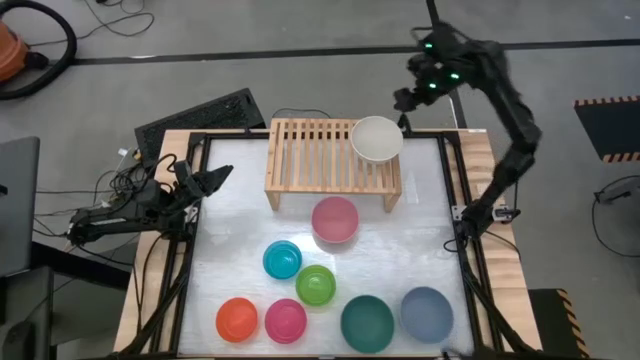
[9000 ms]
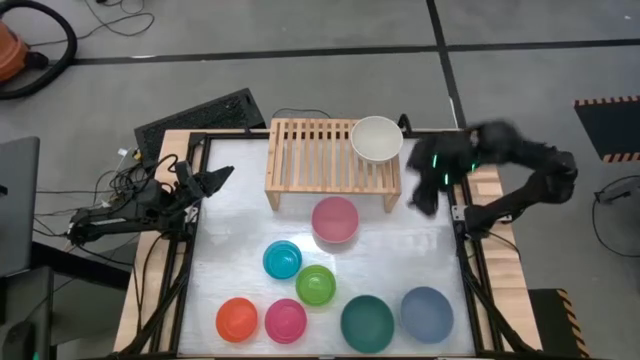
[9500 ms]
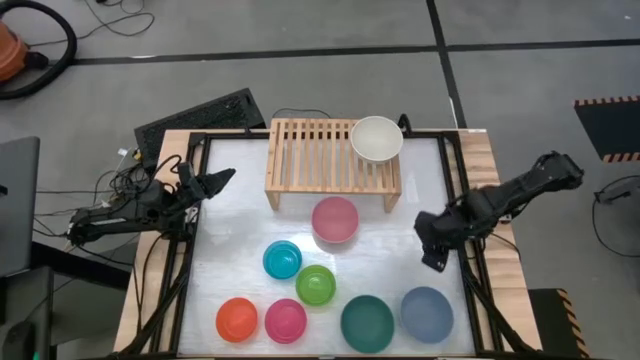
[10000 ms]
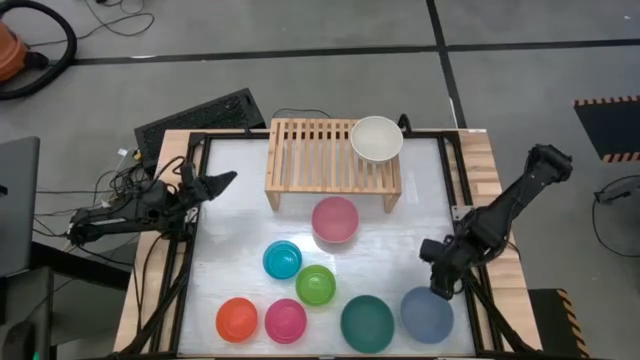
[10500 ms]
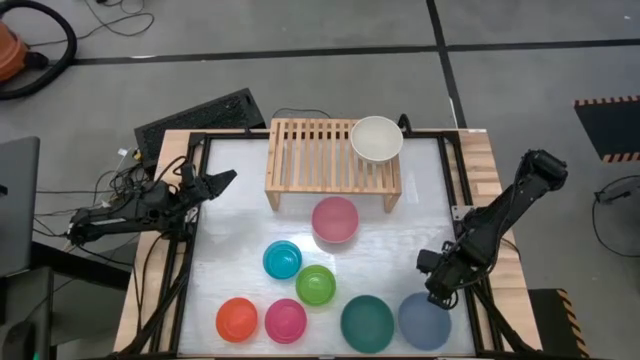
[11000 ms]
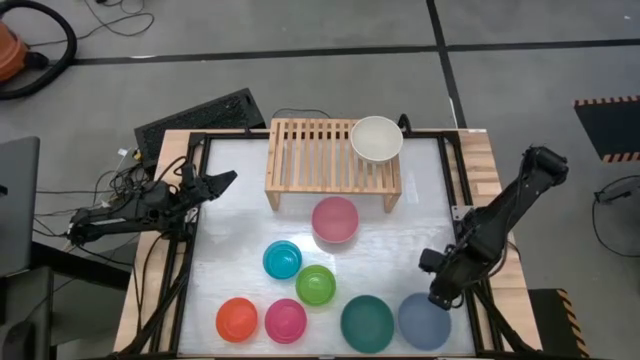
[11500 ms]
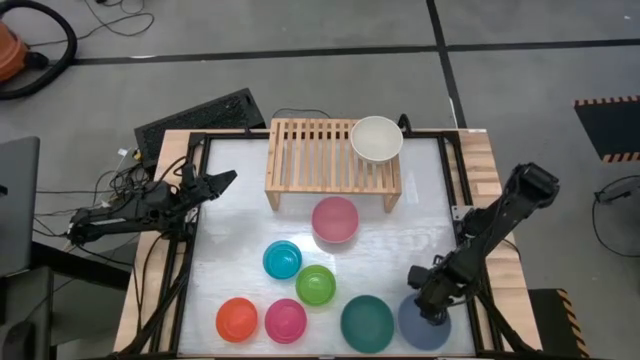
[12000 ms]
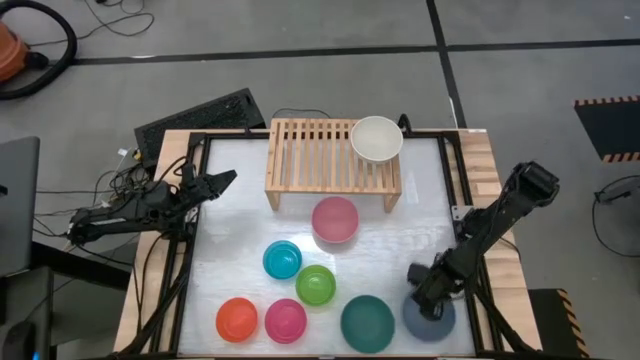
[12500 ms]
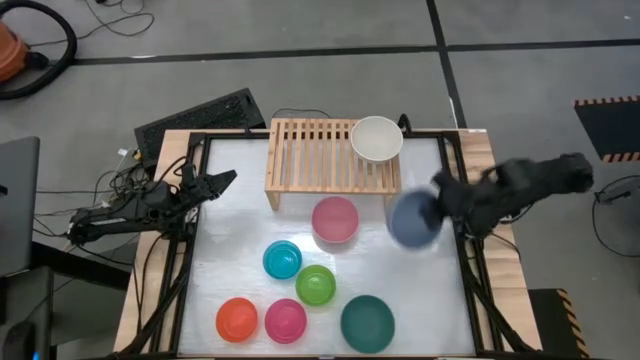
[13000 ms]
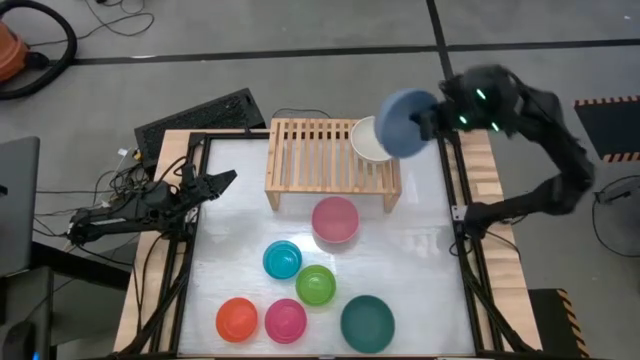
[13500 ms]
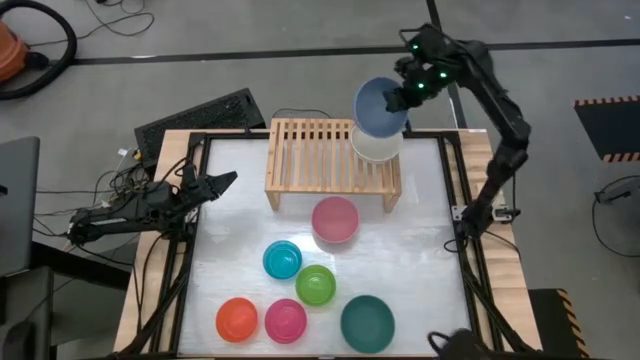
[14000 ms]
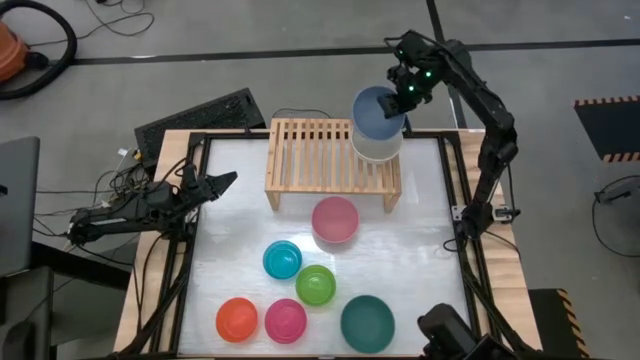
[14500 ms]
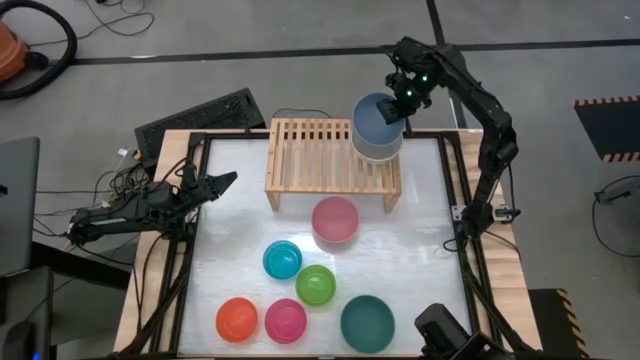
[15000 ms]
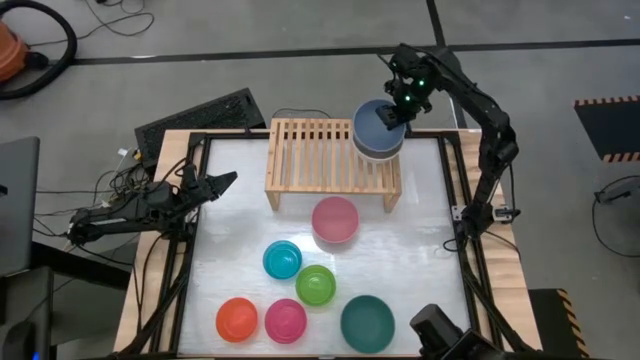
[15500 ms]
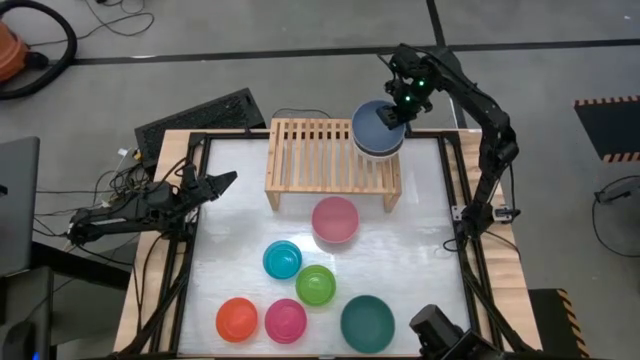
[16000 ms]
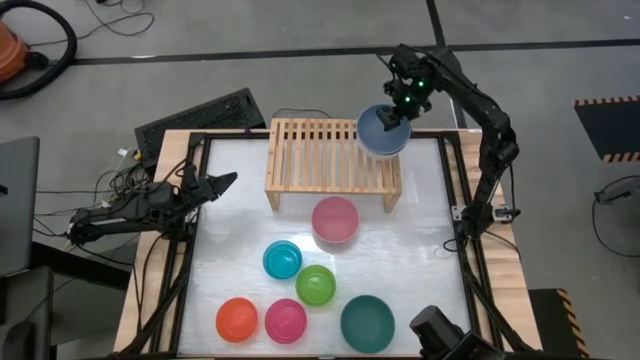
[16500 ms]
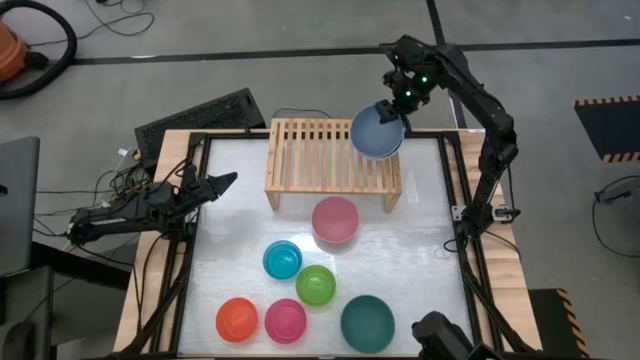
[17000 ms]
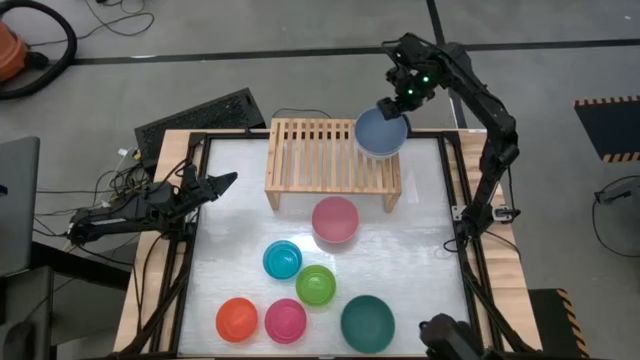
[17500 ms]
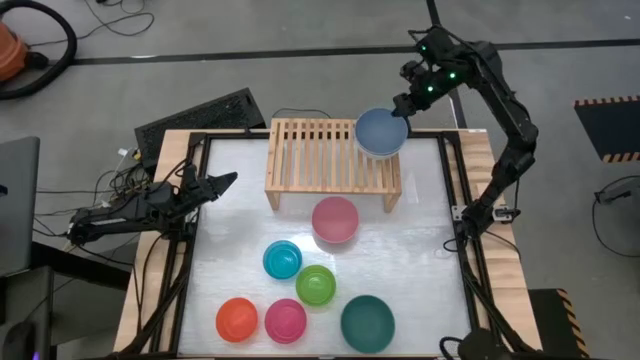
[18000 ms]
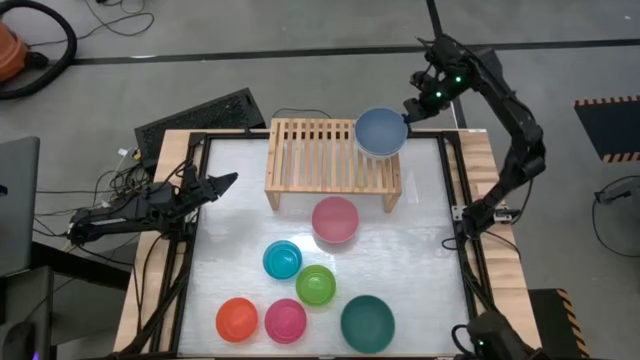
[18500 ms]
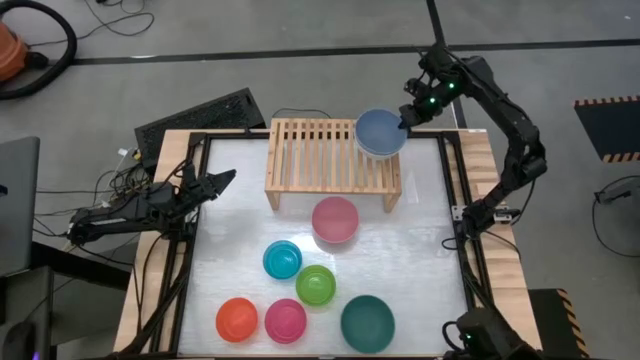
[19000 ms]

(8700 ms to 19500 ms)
Task: Place and stack bowls onto a shelf
Stack the dark blue bowl on top of the white bowl on the shelf

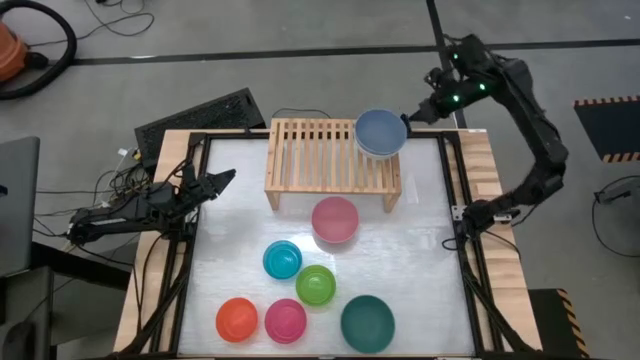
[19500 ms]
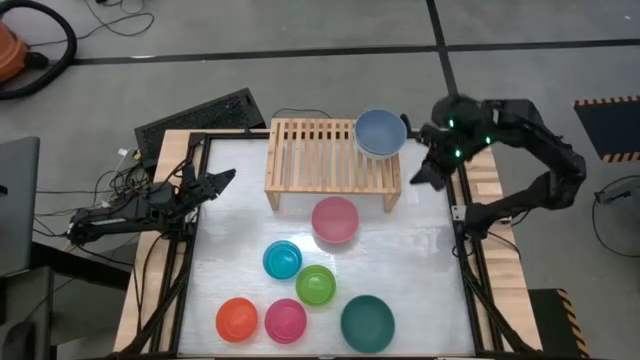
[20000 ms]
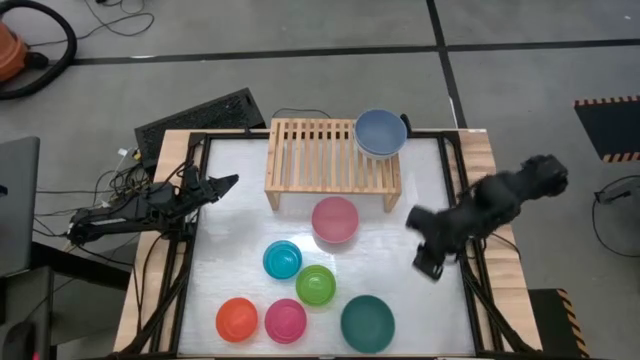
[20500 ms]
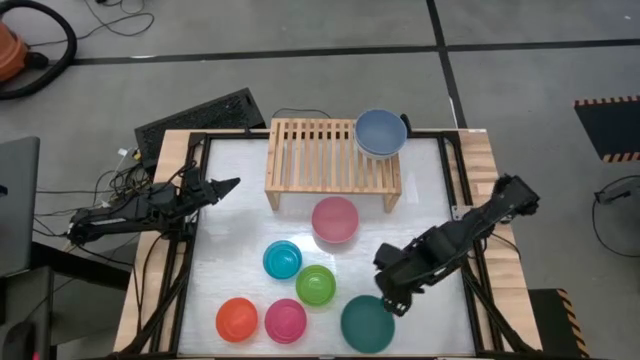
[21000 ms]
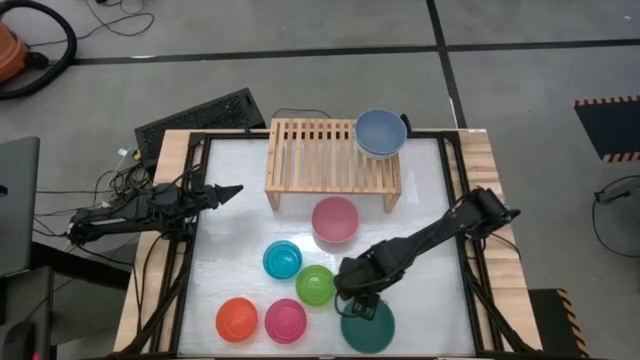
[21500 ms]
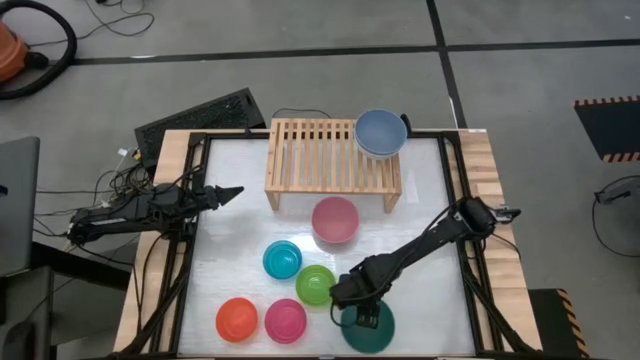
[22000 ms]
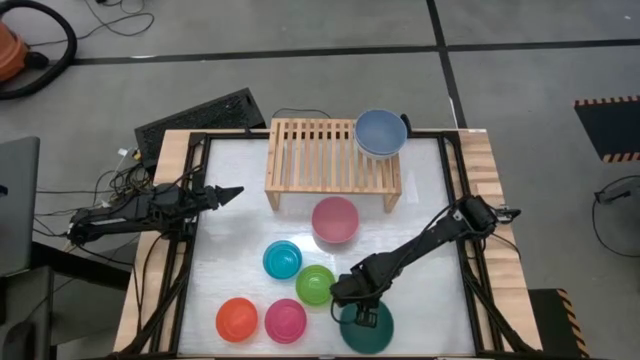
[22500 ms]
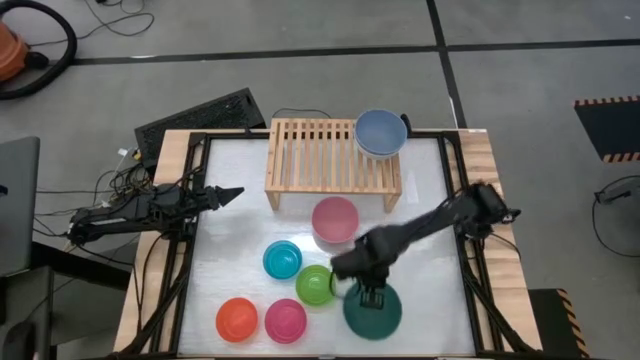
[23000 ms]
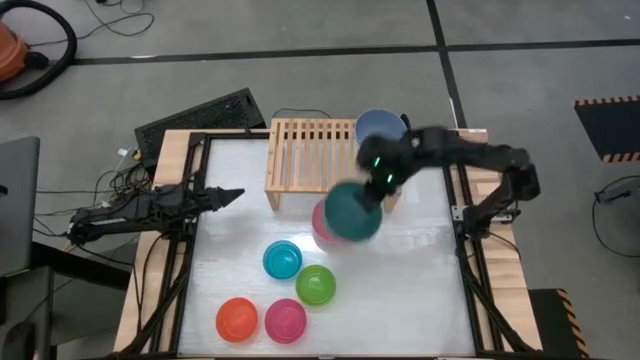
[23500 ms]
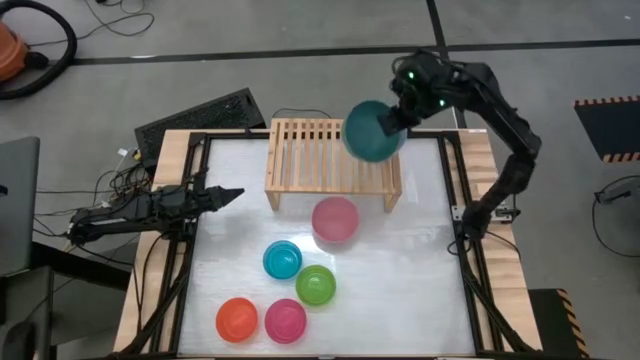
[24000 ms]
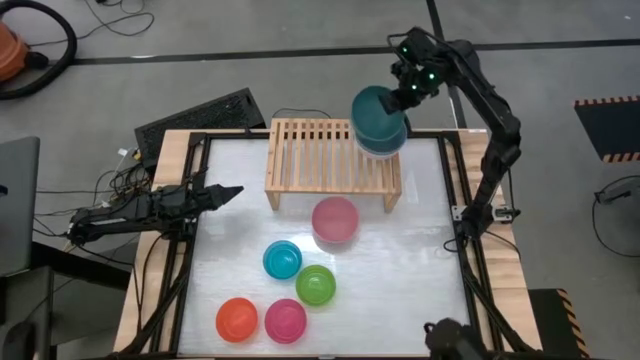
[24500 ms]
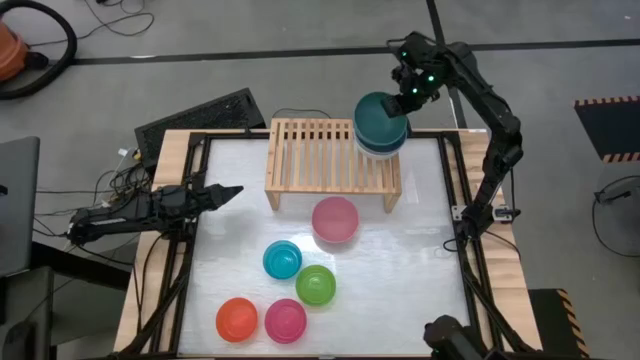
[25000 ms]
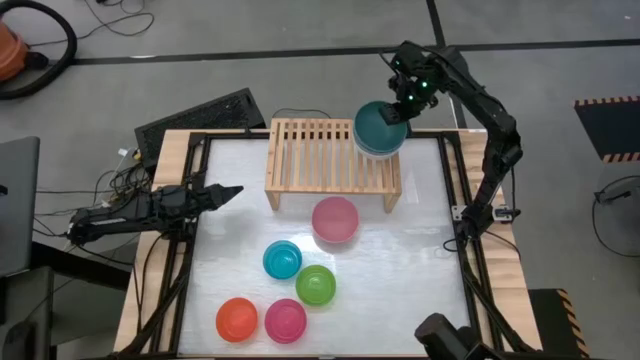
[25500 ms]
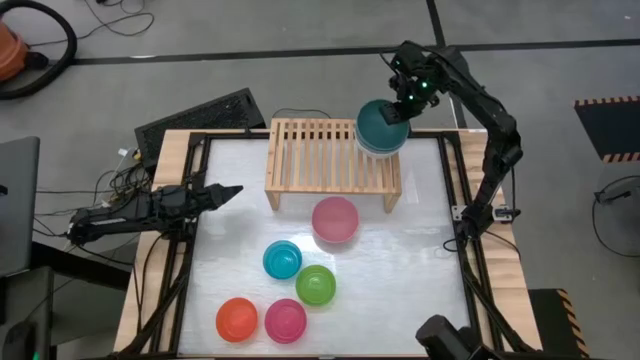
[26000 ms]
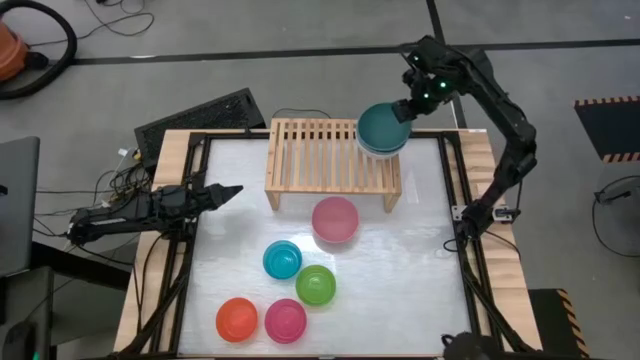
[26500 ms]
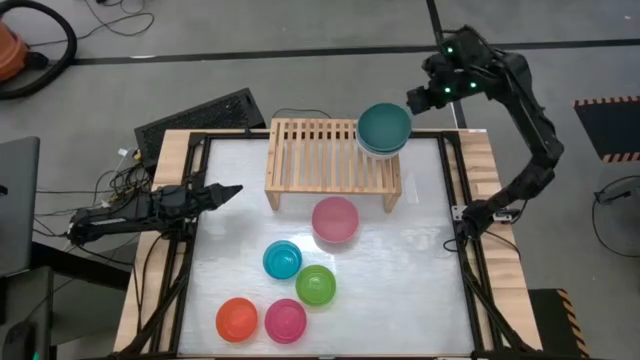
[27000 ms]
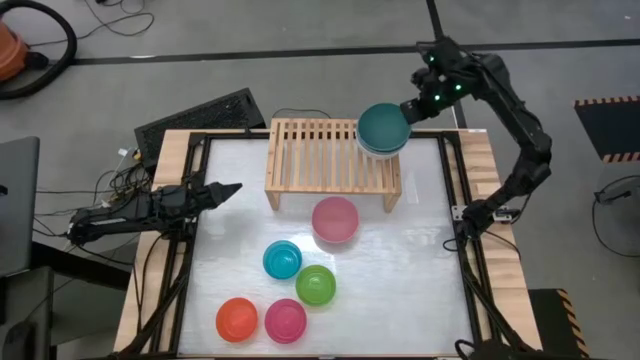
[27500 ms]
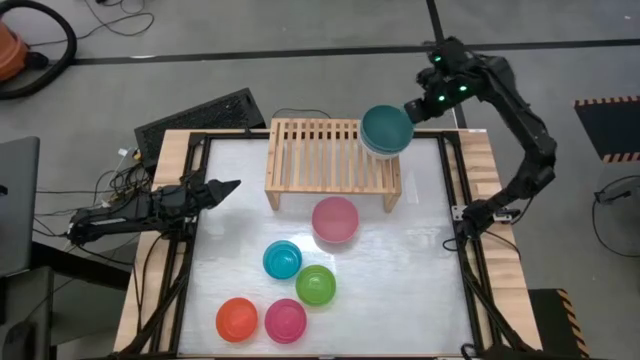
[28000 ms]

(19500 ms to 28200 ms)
Stack the dark green bowl on top of the dark blue bowl on the shelf

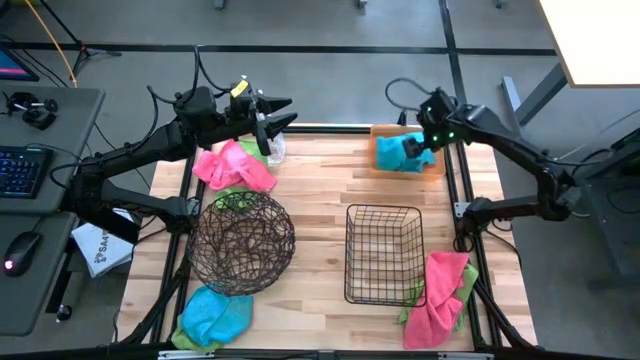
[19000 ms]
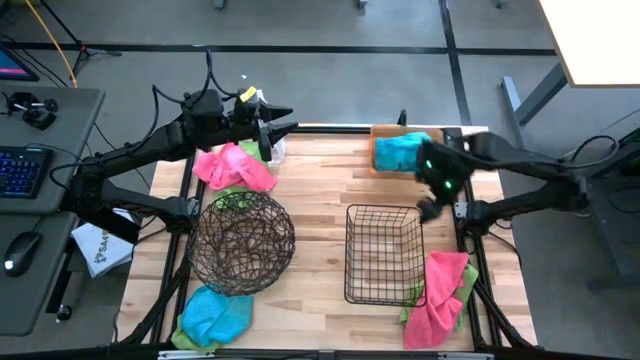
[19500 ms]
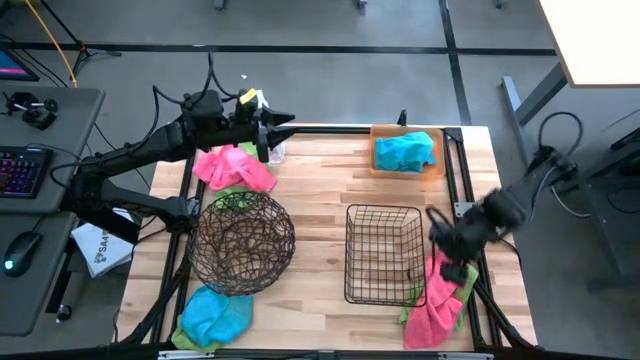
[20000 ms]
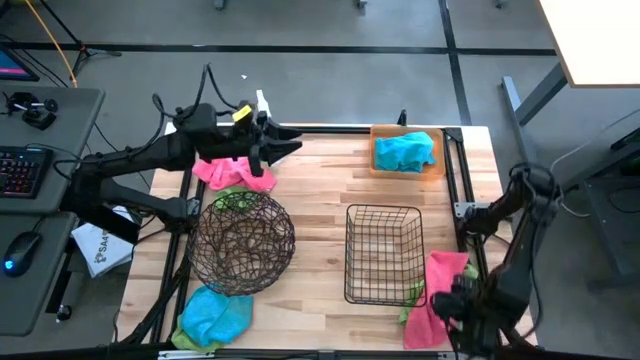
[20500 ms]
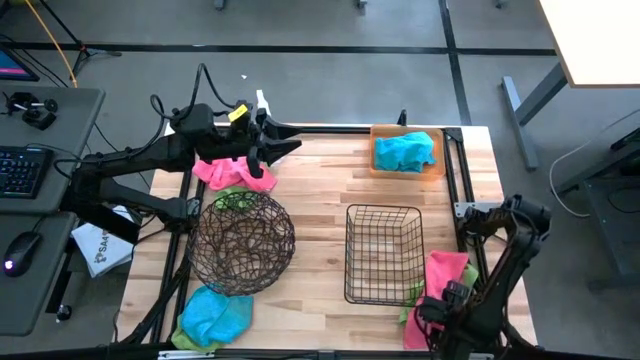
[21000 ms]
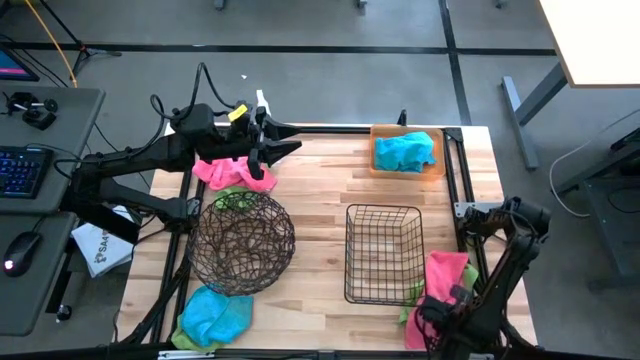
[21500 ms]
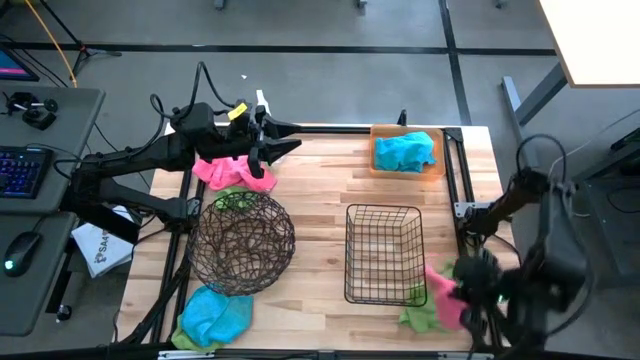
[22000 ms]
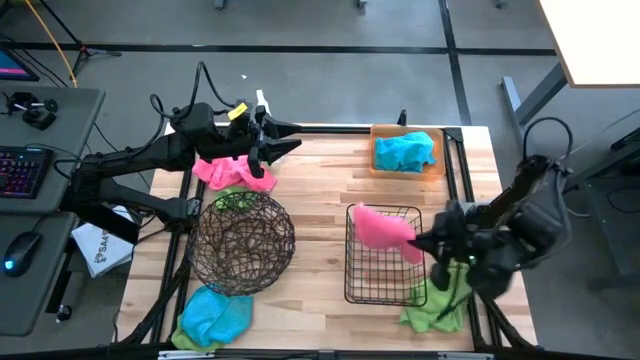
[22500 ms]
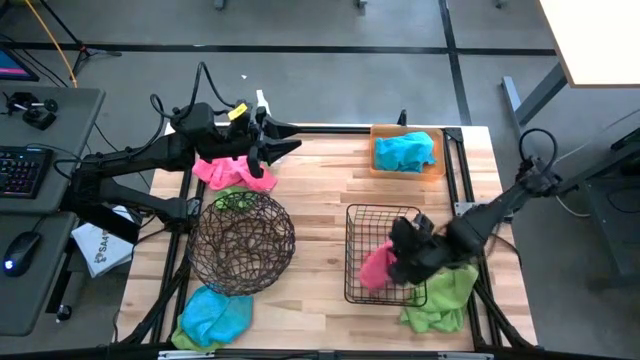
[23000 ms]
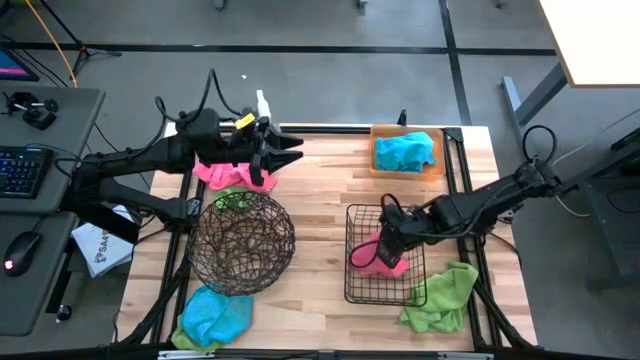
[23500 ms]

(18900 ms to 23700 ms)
Task: Sort microfiber towel by color & place in baskets
Put the bottom pink towel into the wire basket
